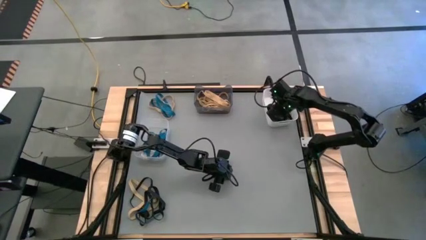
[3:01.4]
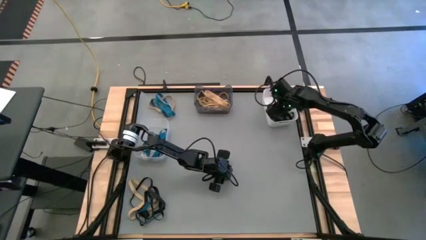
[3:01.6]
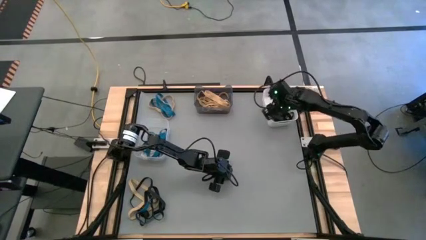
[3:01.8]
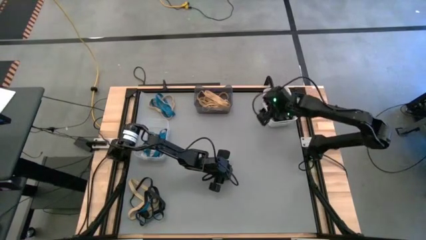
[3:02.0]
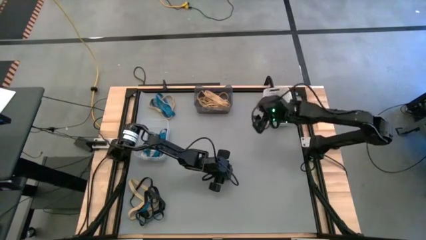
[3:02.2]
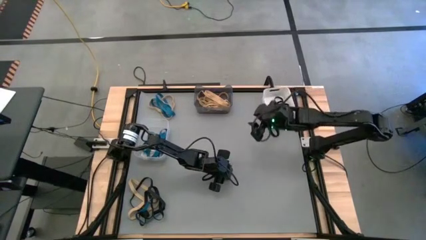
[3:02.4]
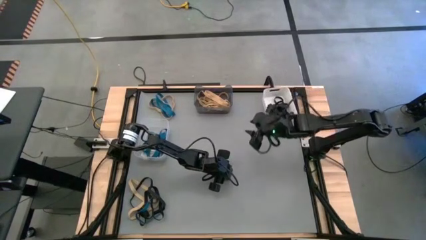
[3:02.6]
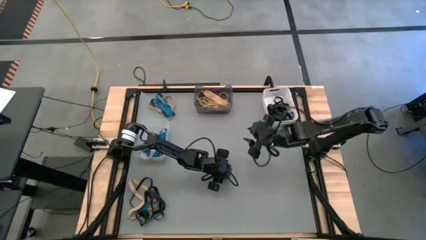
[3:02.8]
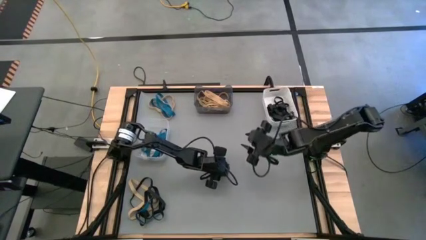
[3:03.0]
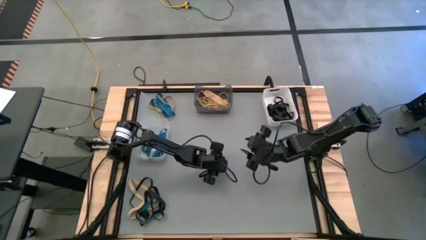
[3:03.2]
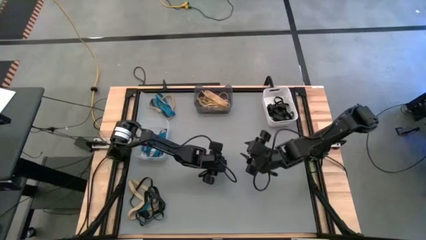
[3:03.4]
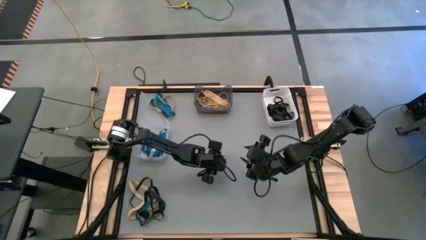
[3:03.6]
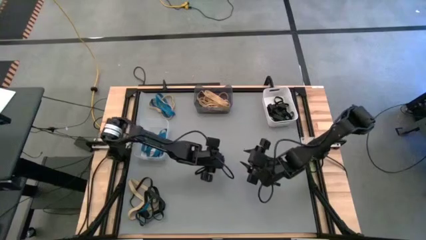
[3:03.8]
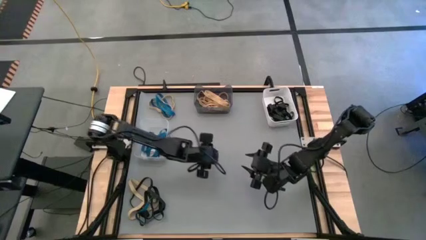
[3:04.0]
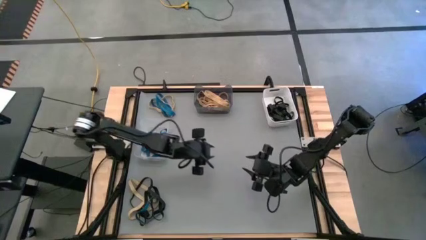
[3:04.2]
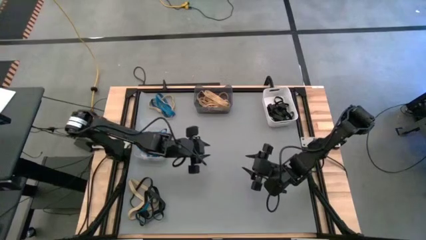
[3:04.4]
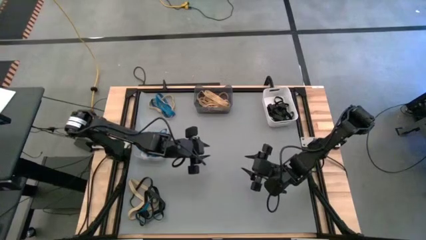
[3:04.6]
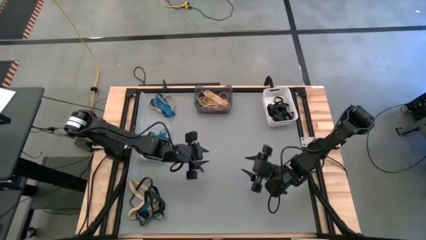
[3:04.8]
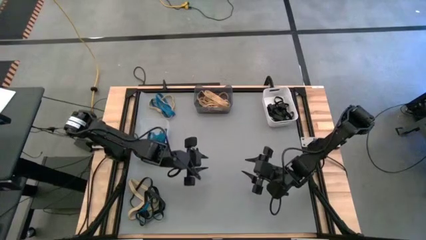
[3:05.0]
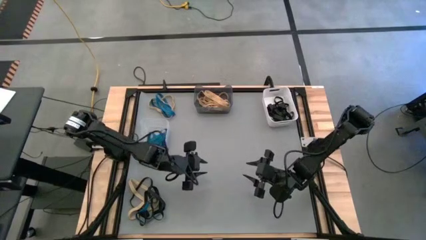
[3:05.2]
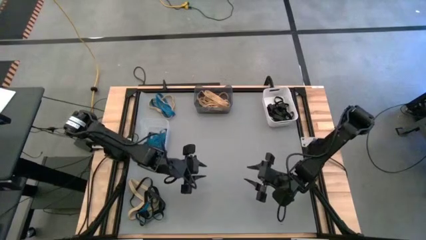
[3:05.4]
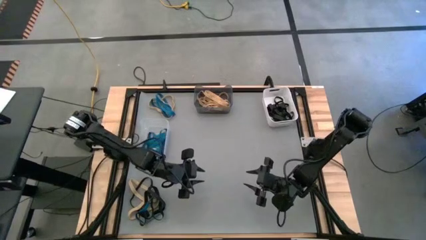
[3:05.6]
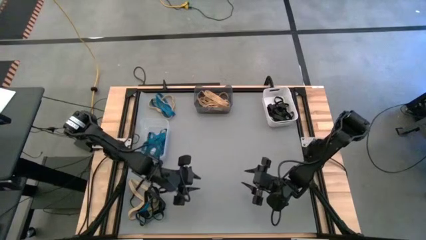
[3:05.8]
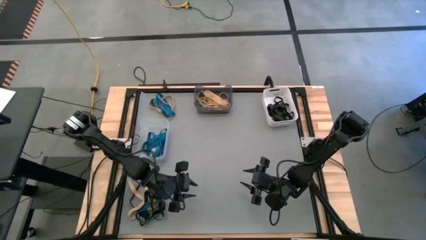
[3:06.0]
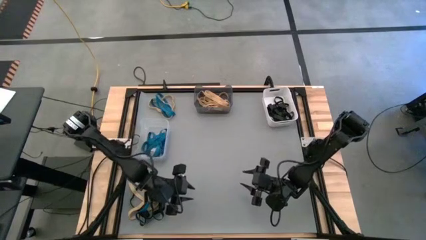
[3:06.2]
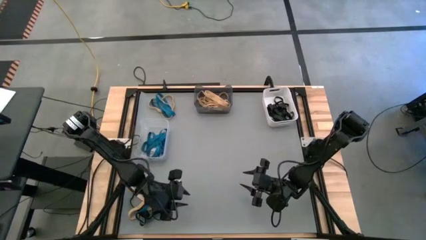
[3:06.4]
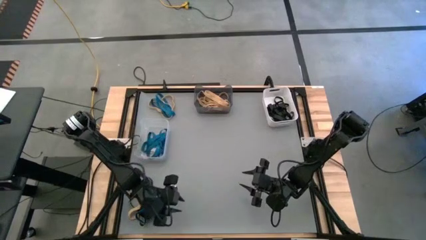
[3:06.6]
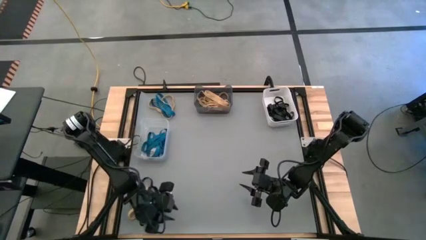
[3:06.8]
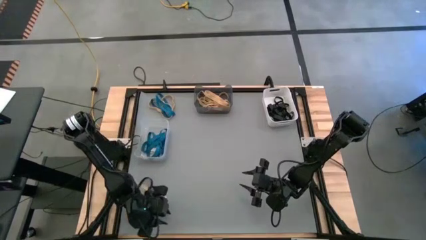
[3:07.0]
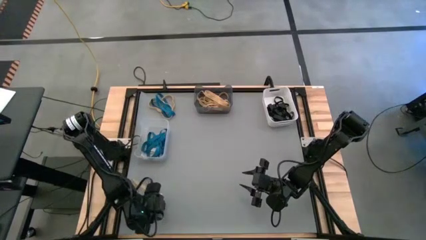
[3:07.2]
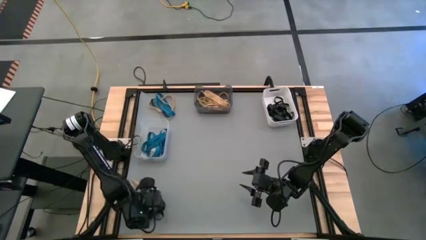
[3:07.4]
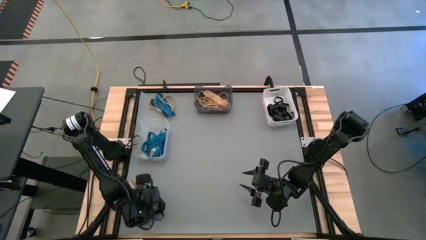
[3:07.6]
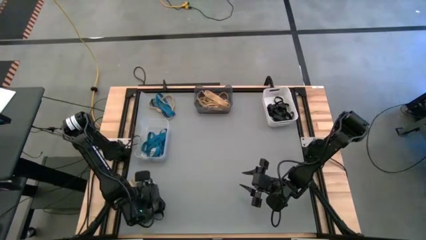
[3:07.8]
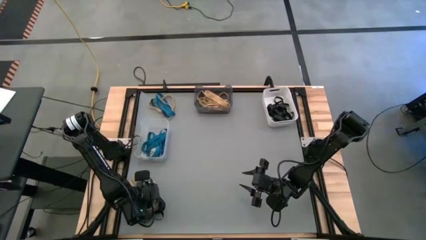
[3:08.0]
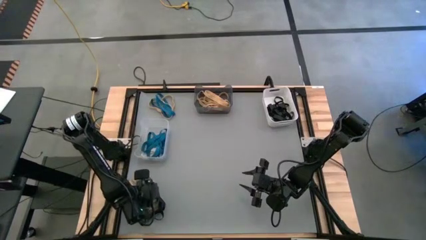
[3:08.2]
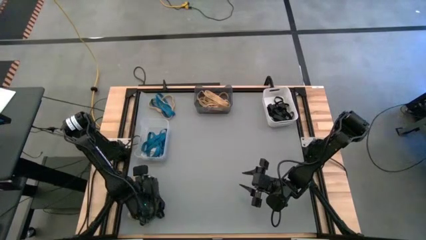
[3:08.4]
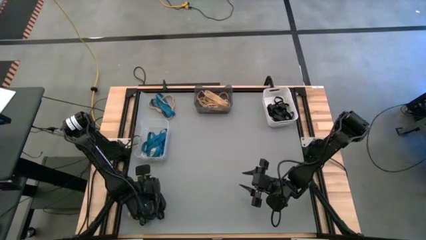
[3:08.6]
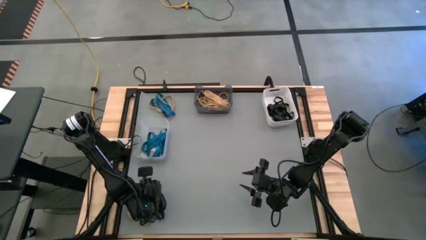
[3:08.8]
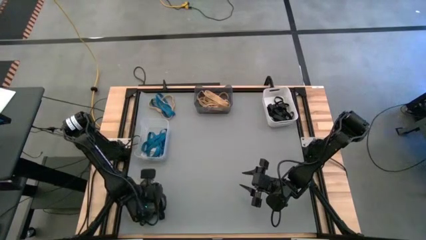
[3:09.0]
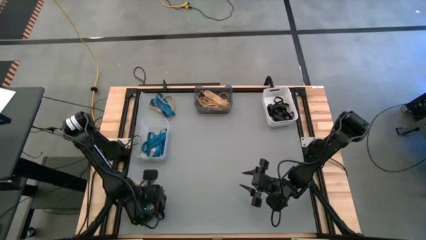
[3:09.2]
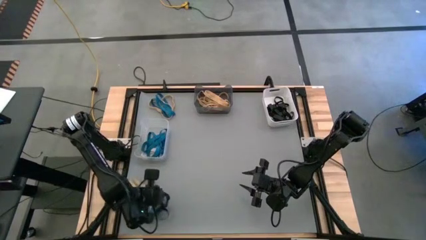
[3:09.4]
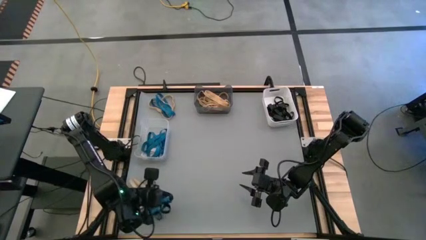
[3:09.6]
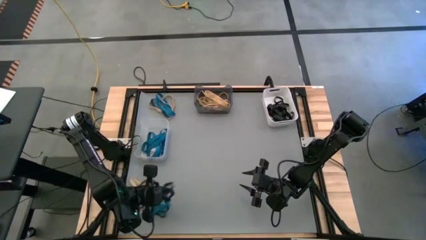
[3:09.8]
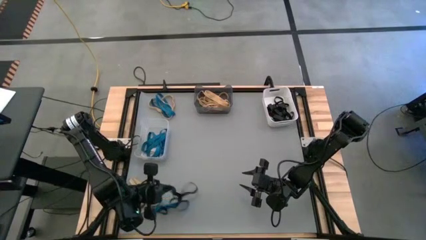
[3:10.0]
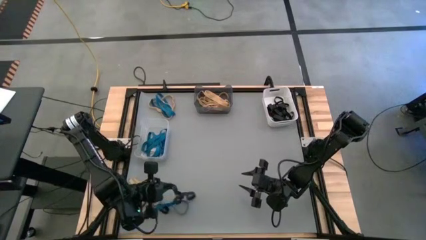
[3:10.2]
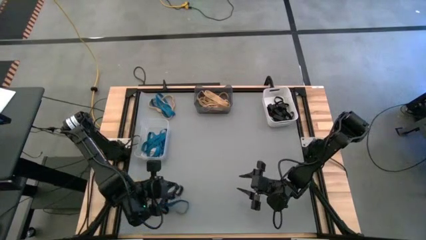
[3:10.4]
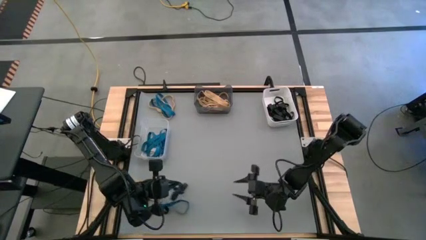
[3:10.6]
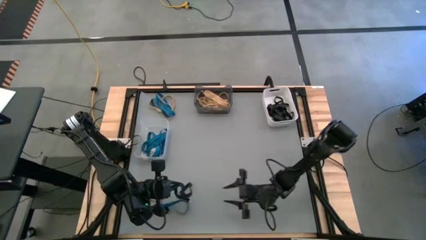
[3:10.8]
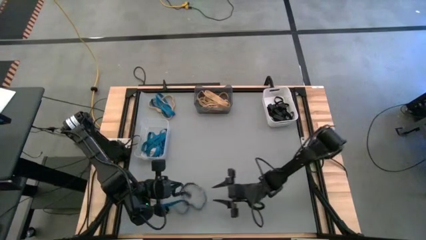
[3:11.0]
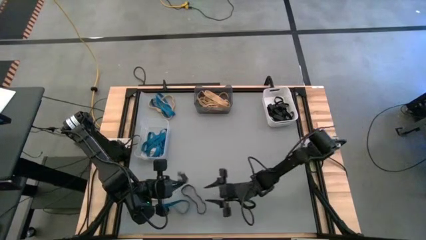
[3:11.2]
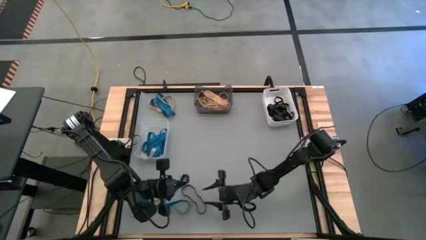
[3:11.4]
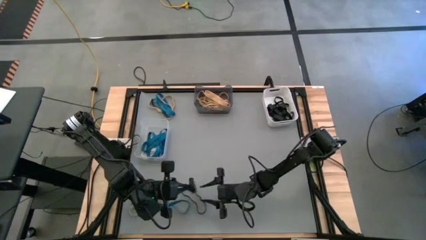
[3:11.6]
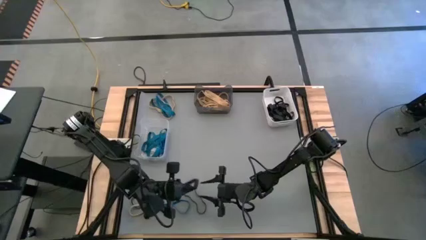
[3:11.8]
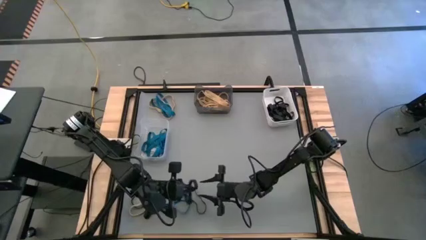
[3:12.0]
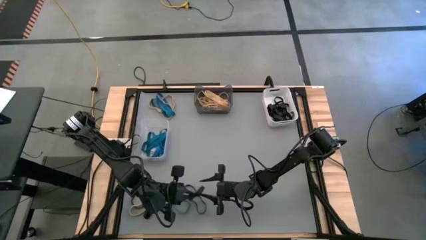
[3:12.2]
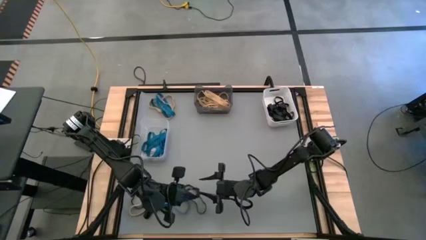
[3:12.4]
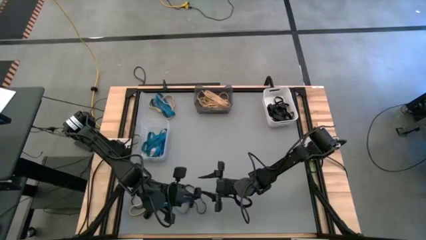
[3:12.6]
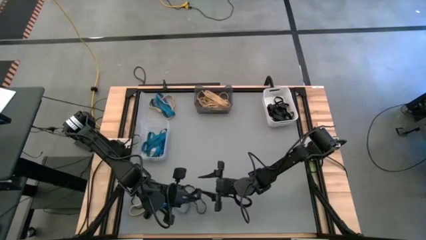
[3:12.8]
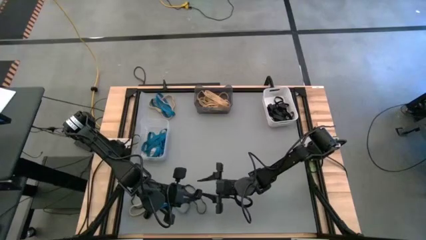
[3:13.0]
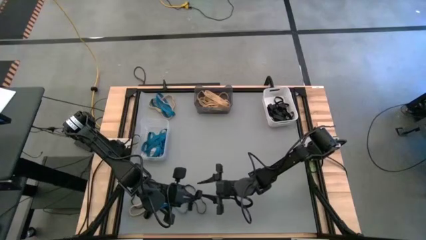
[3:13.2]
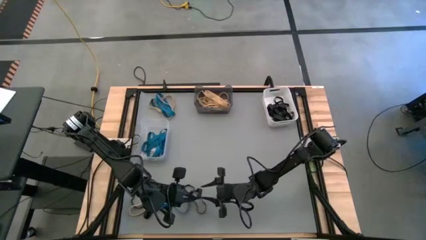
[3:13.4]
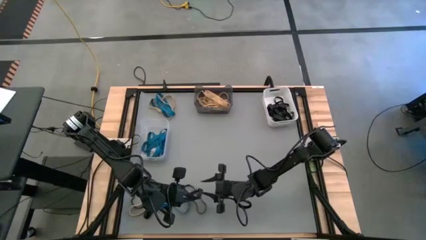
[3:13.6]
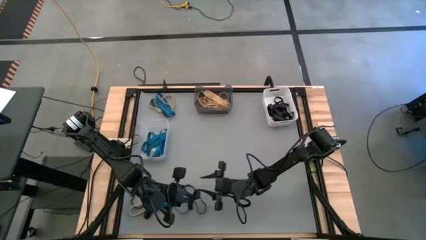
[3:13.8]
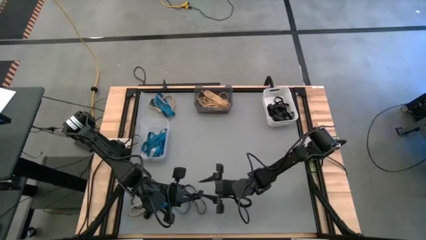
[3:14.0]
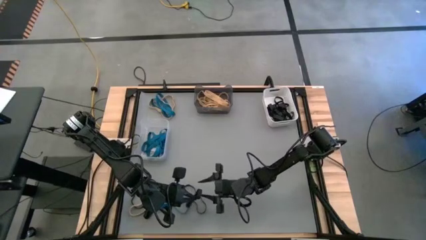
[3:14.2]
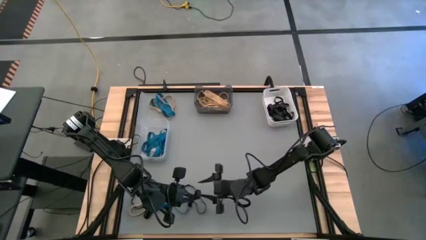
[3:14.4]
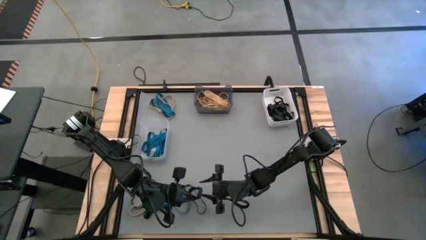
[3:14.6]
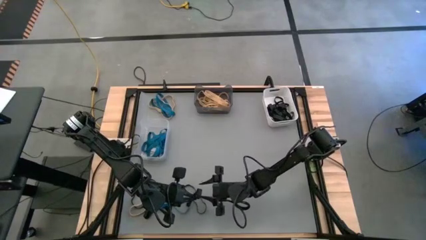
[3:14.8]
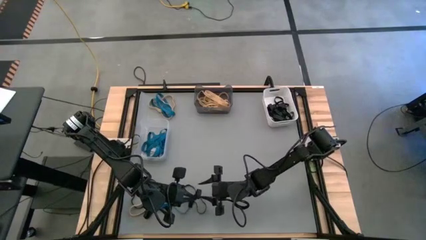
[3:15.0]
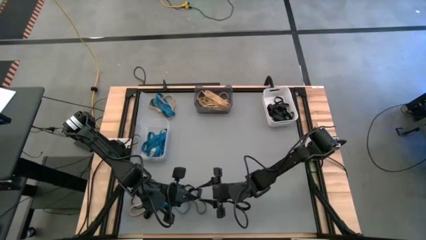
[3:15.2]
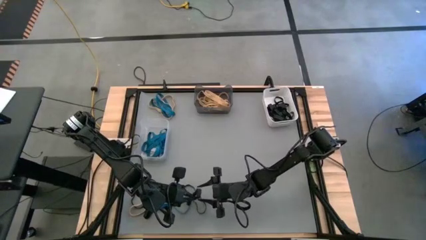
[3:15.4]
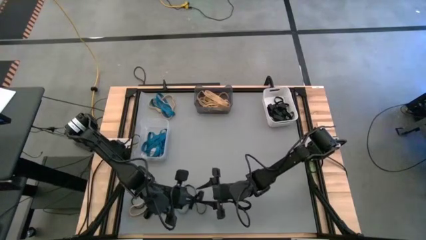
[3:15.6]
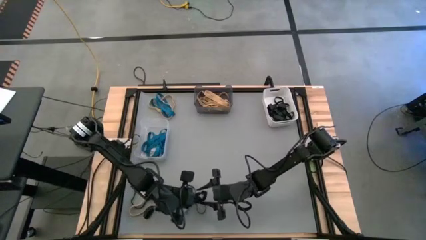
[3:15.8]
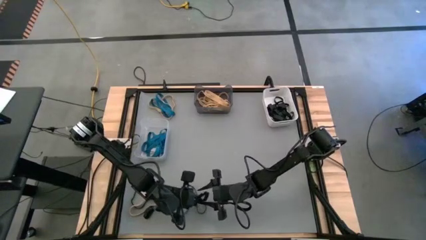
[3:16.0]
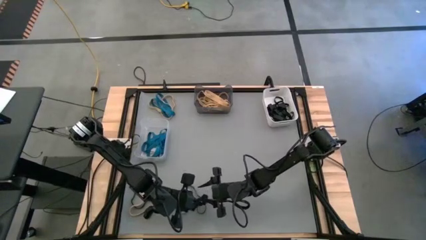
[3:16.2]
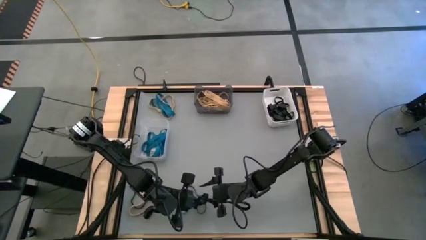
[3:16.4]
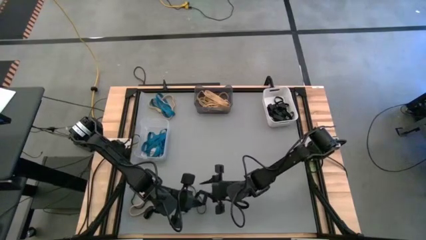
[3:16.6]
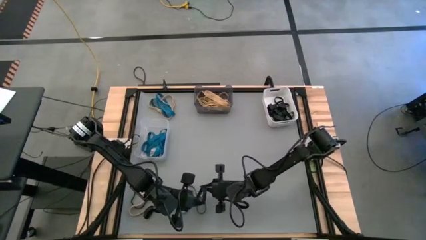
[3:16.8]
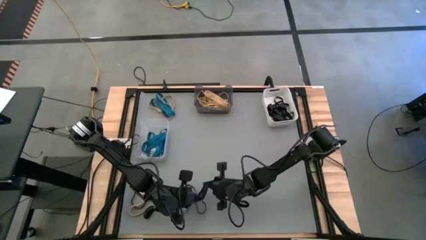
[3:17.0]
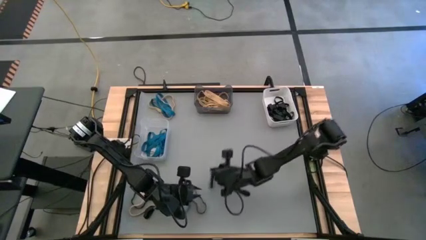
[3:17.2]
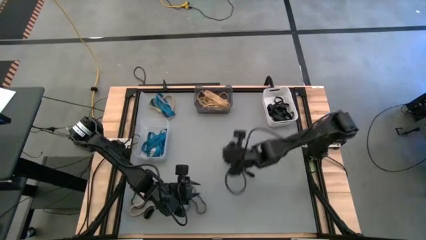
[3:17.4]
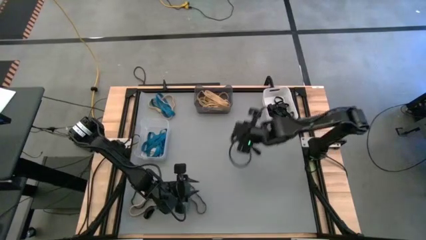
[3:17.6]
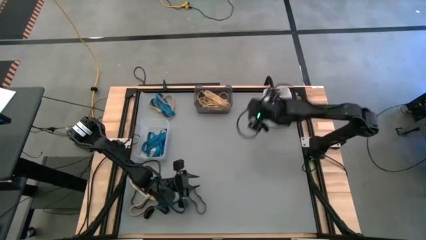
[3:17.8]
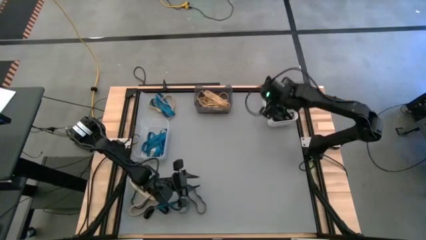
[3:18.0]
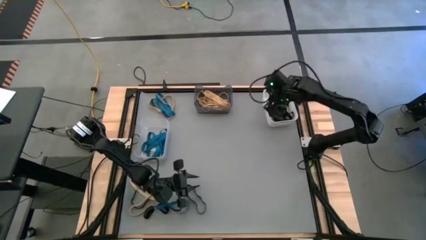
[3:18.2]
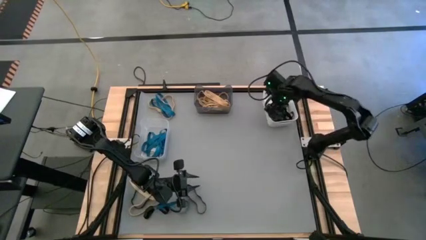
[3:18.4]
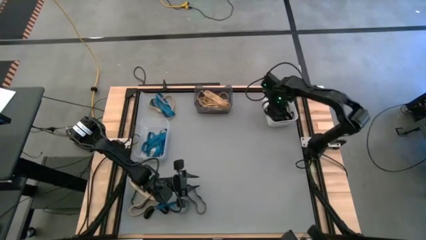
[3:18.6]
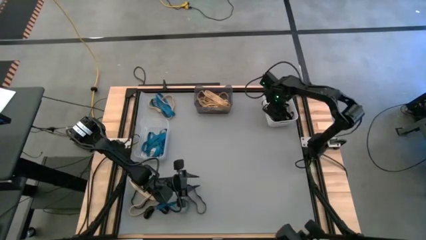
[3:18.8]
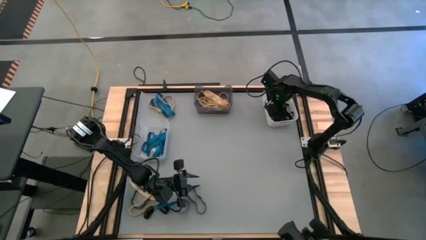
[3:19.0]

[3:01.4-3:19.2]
Task: Sort rubber bands into baskets
Put the black rubber band into the white bin
